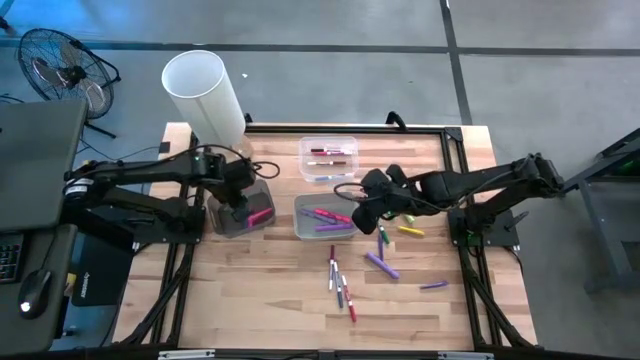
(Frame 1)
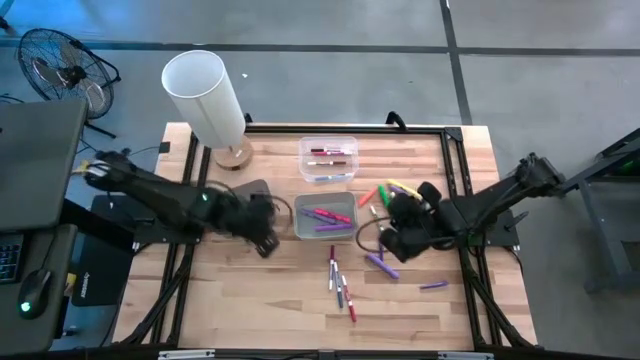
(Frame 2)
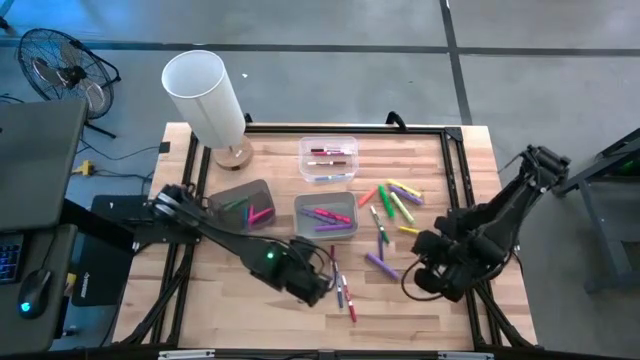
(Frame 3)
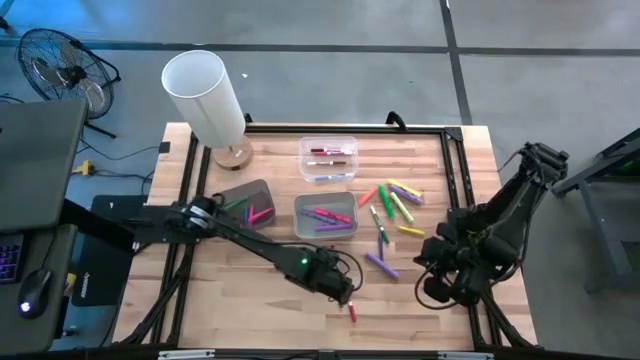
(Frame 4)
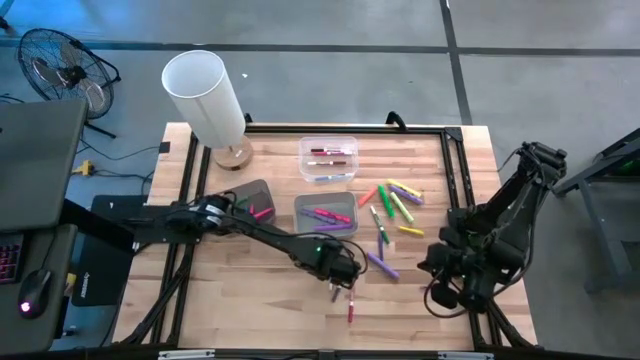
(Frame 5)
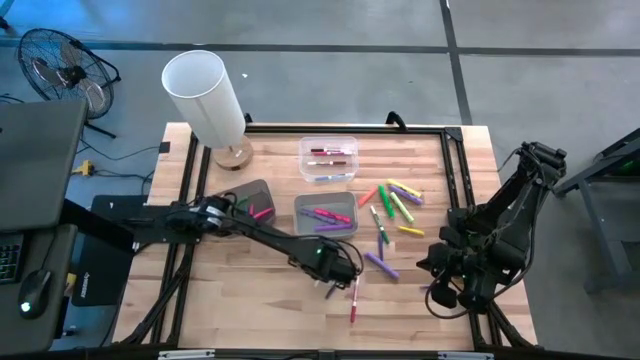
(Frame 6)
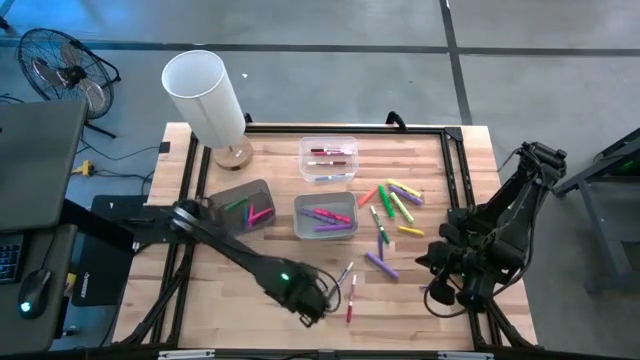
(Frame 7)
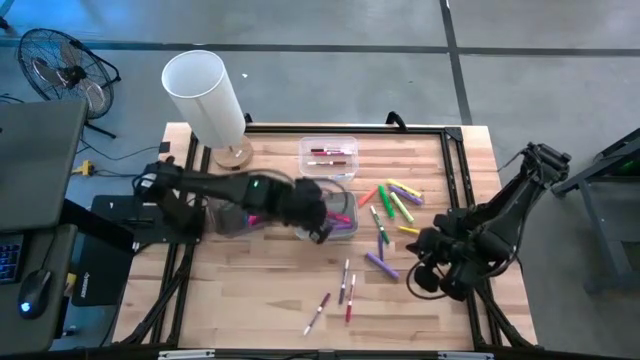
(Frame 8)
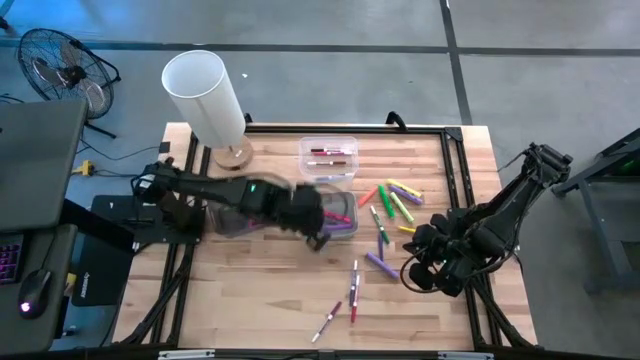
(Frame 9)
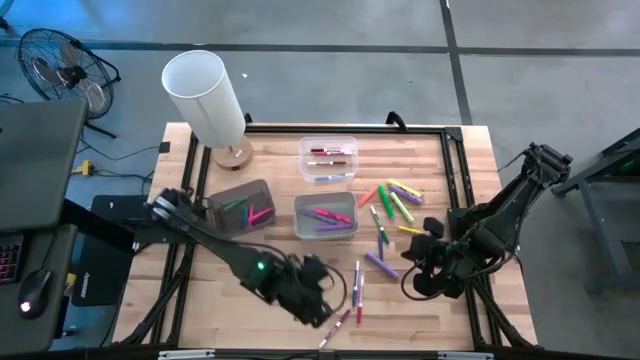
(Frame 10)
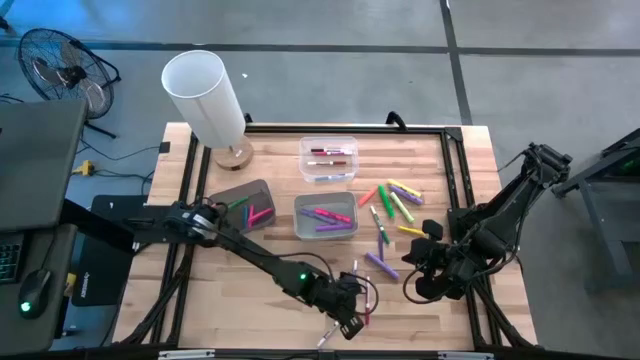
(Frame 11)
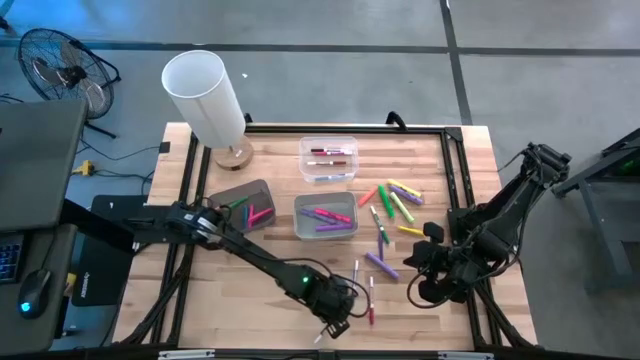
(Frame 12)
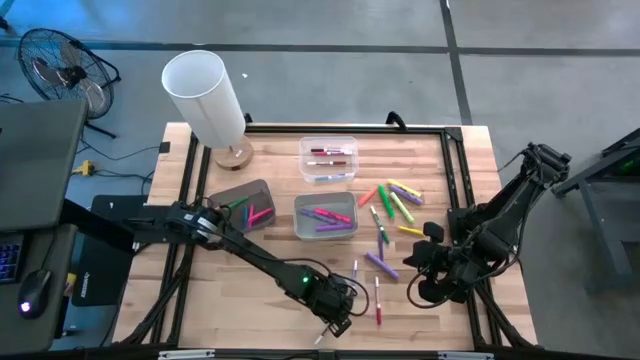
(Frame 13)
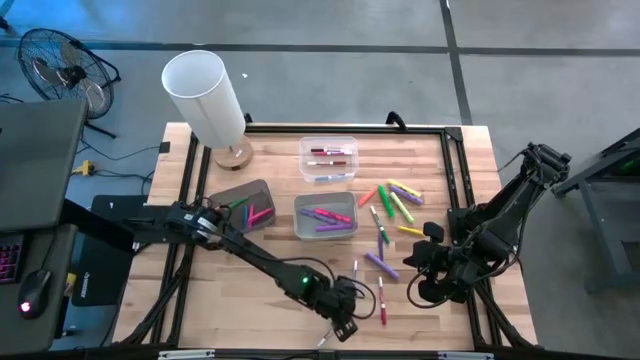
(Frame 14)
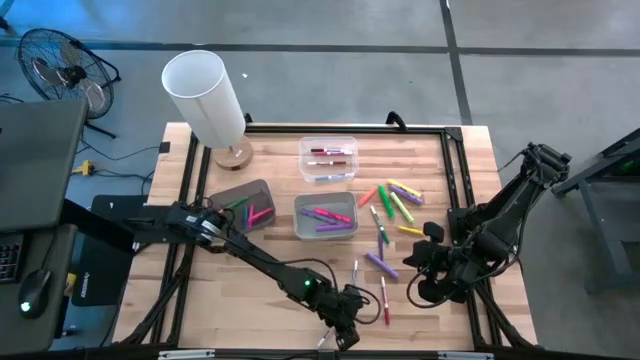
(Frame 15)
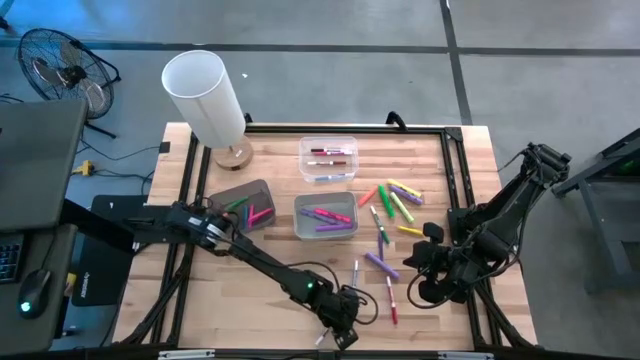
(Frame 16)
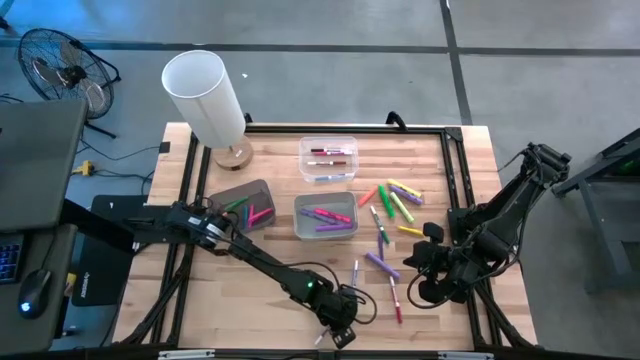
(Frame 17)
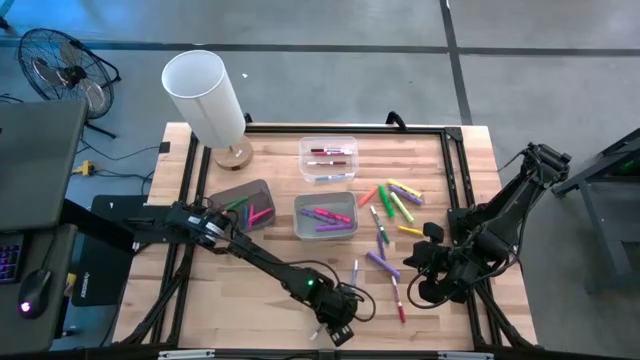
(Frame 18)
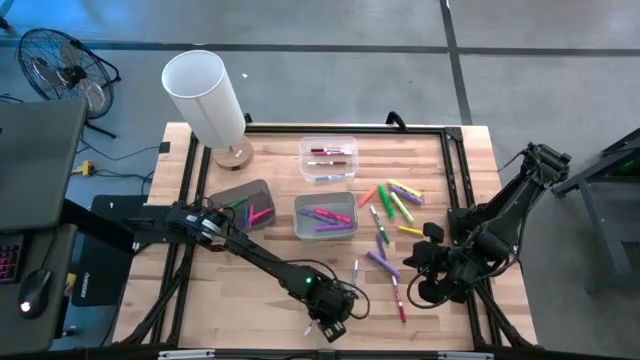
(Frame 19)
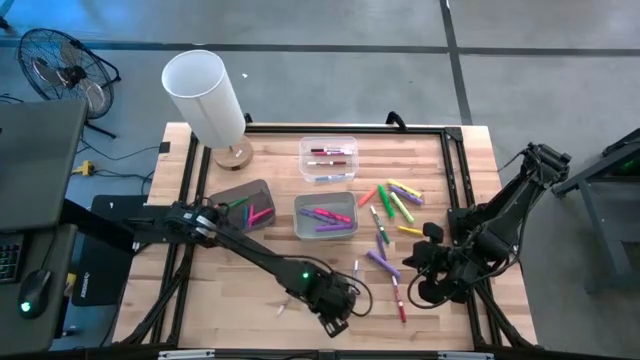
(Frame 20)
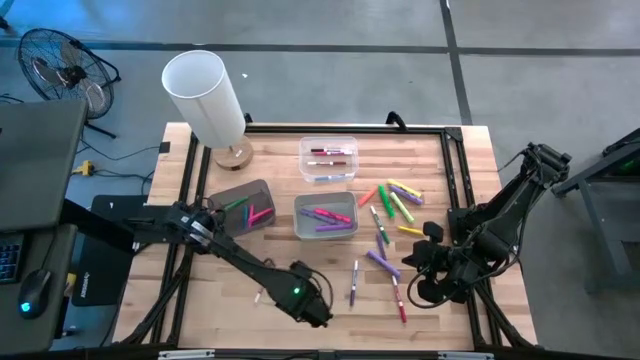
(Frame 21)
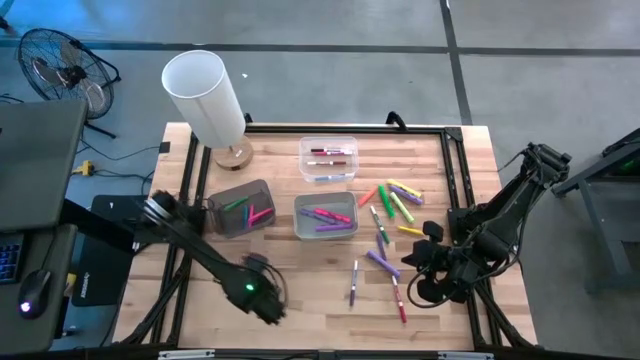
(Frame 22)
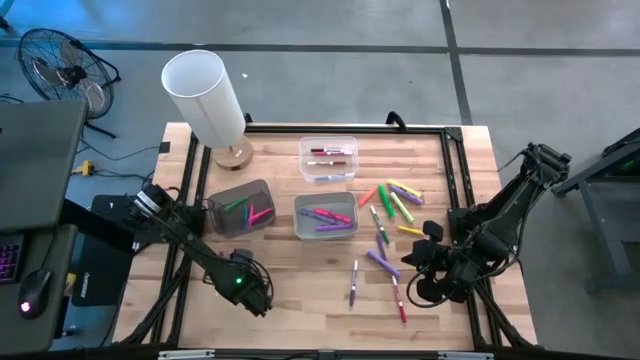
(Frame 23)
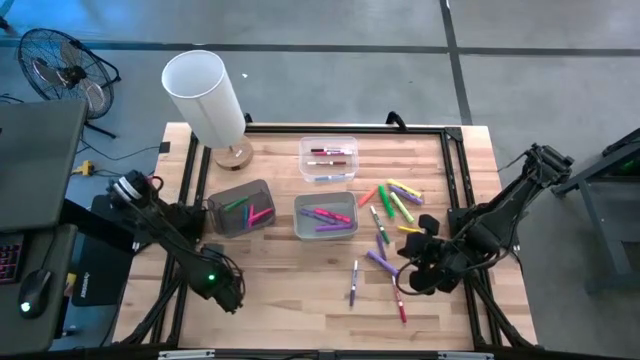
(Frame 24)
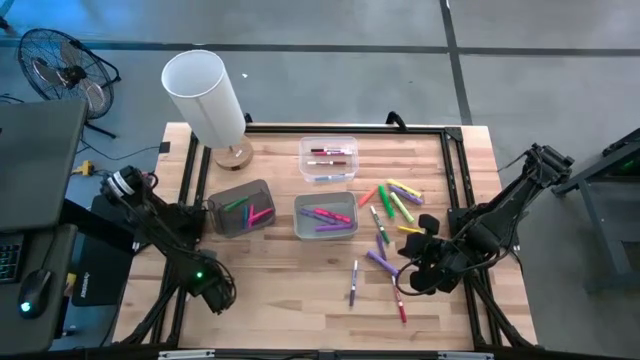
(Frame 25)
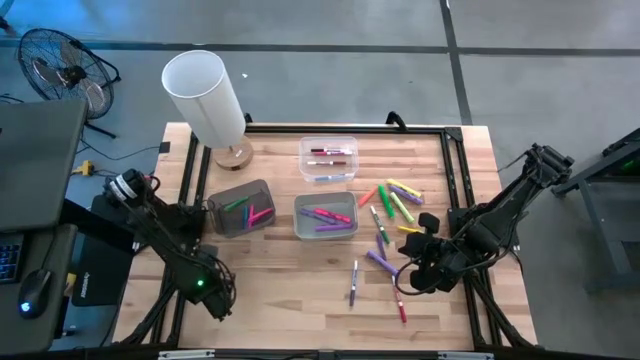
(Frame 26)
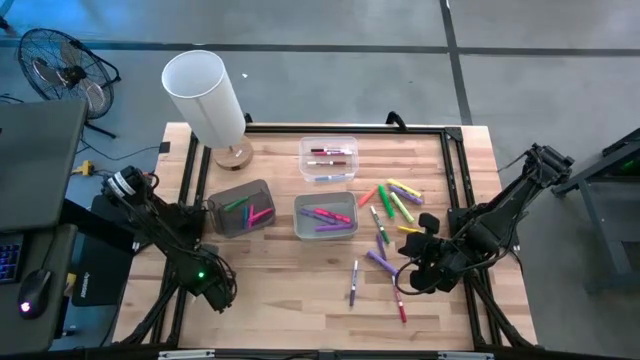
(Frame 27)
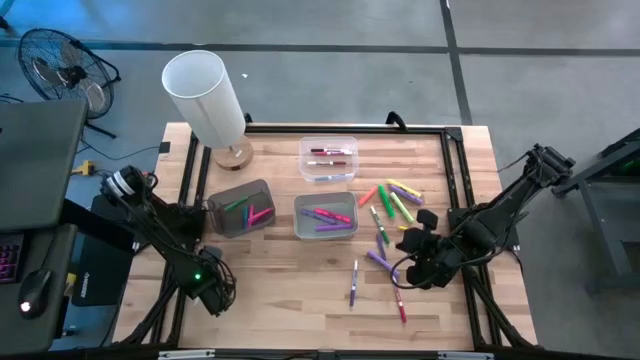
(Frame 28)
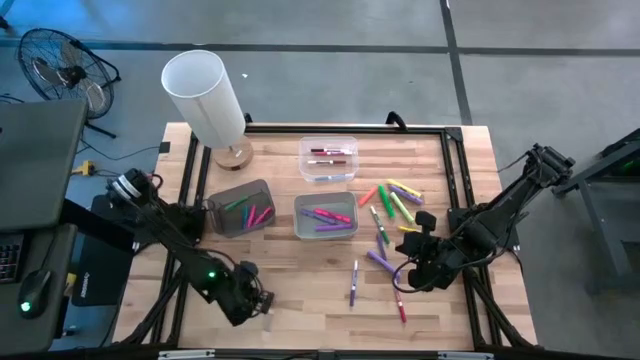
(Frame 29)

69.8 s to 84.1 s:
Task: Pick & Place Markers
Put the purple marker pen into the transparent bin

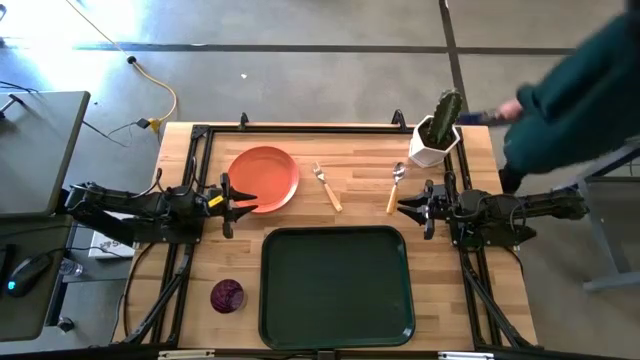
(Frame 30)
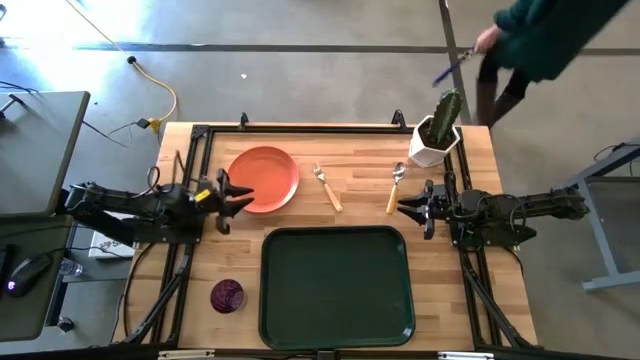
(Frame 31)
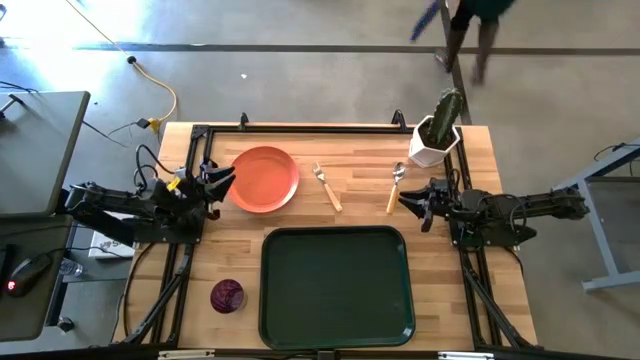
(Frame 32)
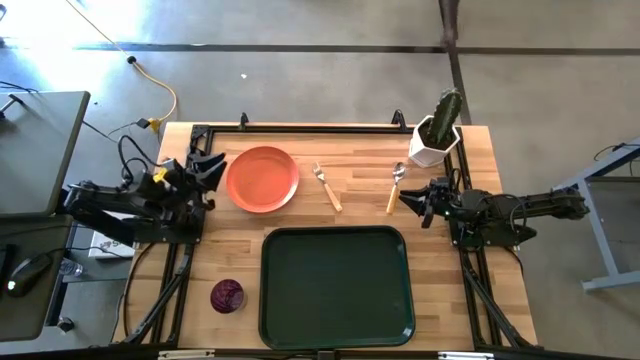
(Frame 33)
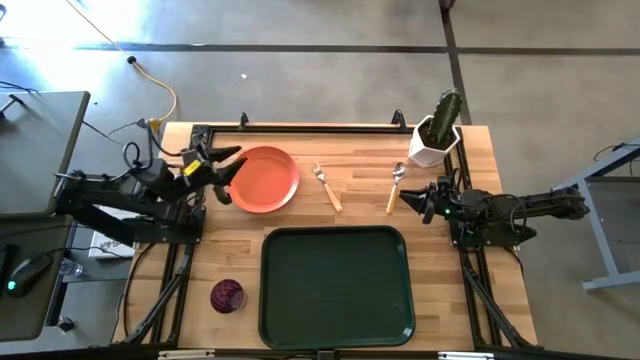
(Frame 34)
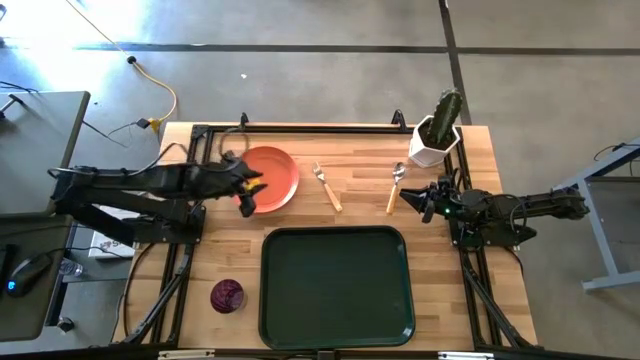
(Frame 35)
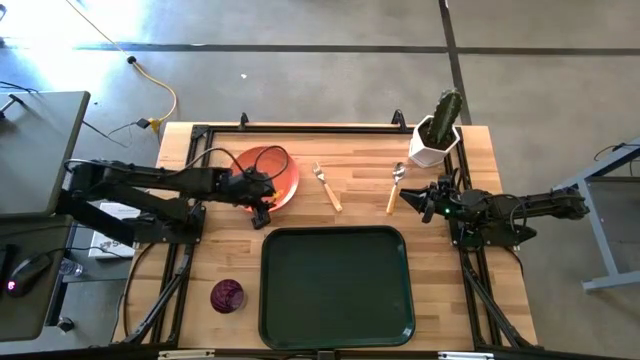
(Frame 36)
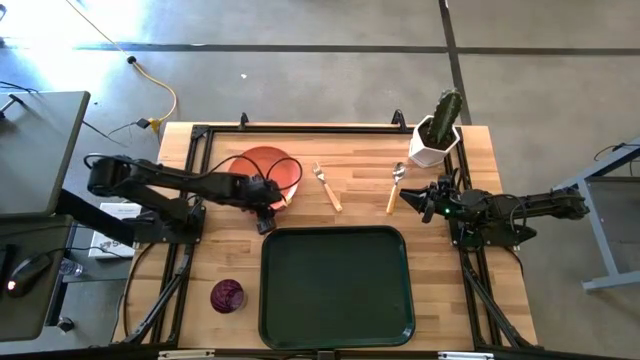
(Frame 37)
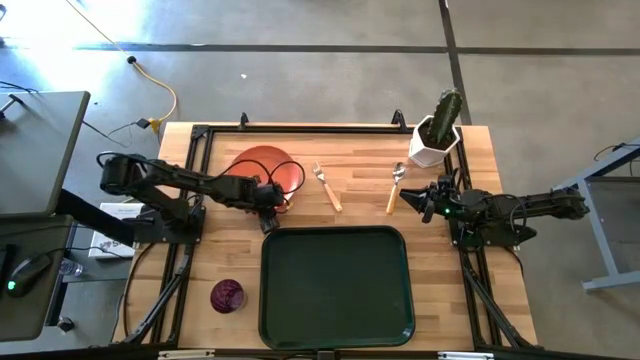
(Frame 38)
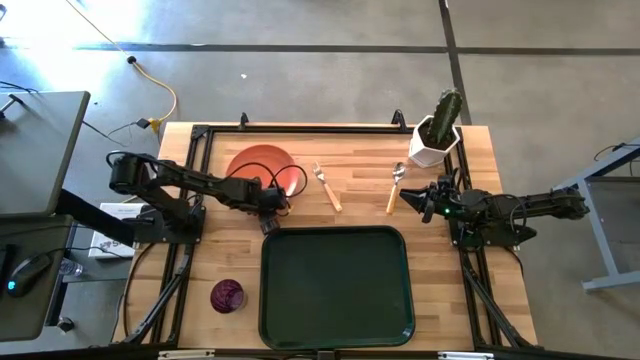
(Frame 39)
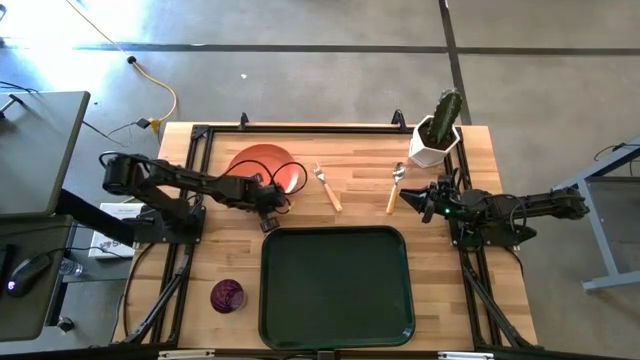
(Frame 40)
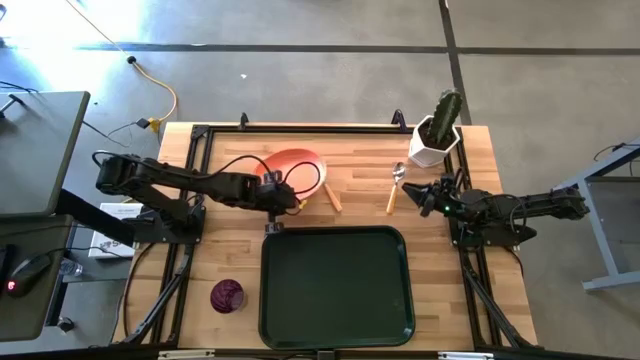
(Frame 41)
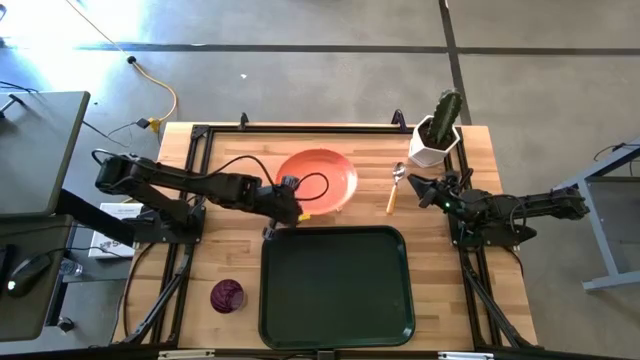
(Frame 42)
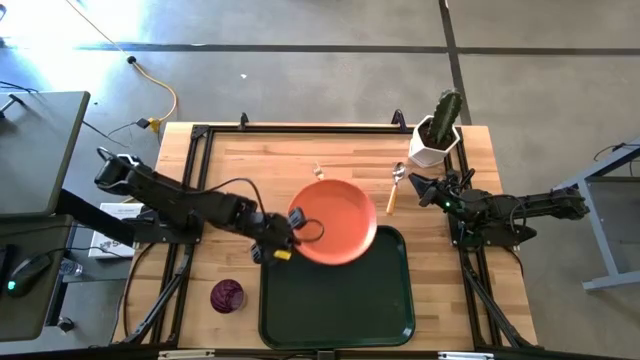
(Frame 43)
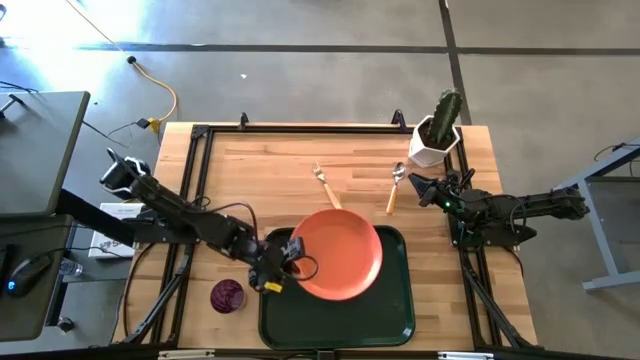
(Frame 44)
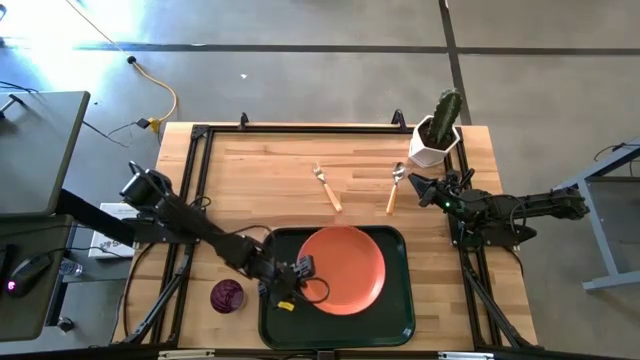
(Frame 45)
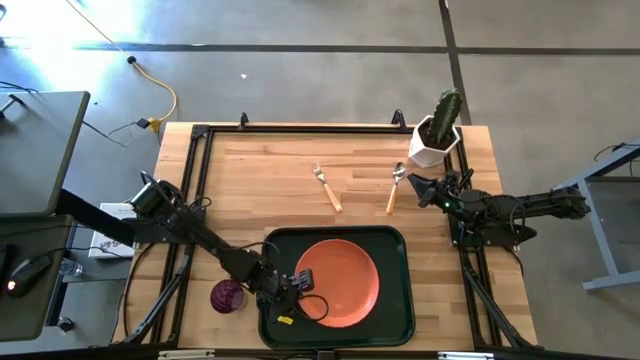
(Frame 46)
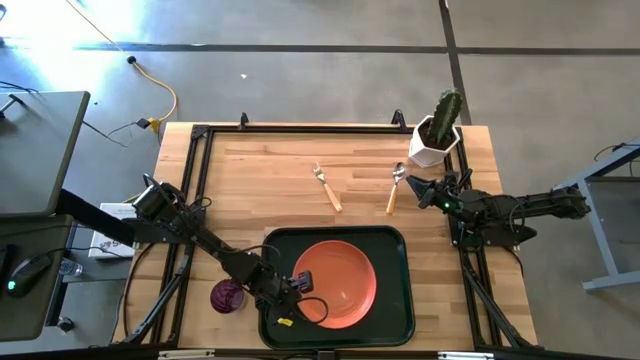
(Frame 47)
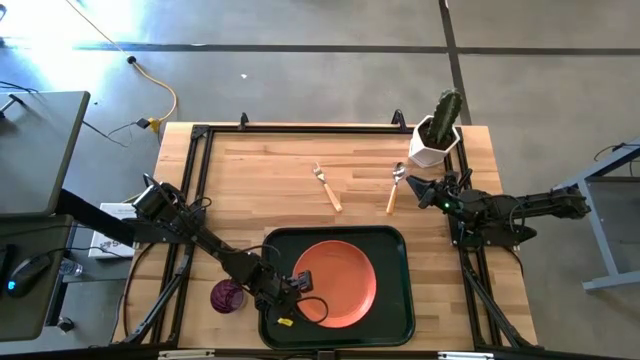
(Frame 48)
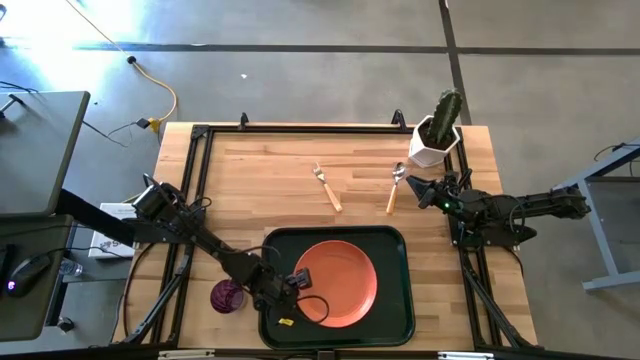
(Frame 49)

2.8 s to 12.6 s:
Task: Pick and place plate/cup/fork/spoon on tray
Put the orange plate on the black tray
